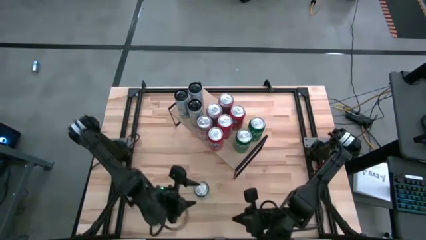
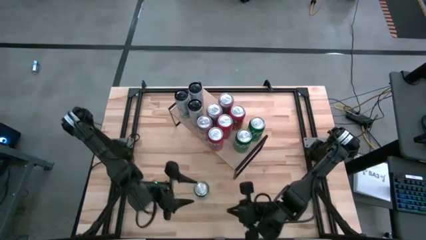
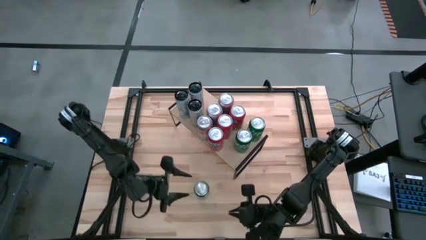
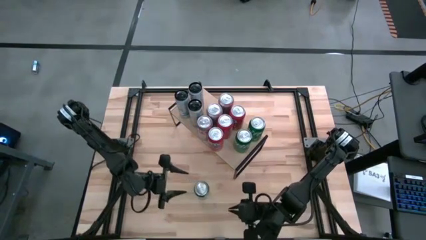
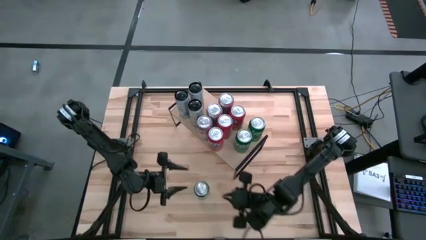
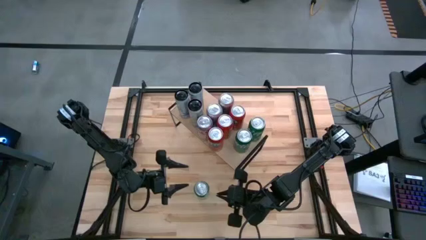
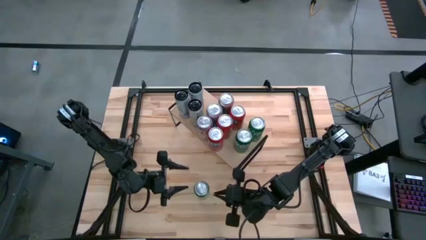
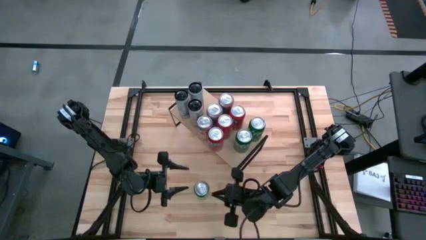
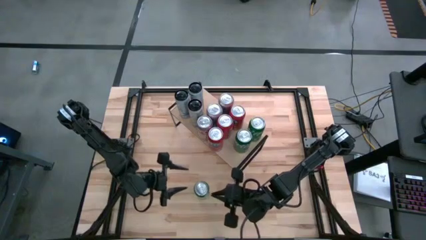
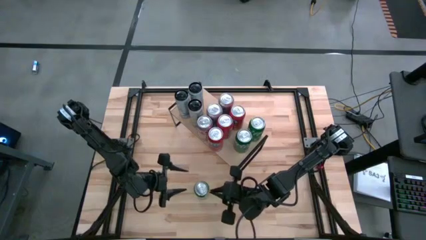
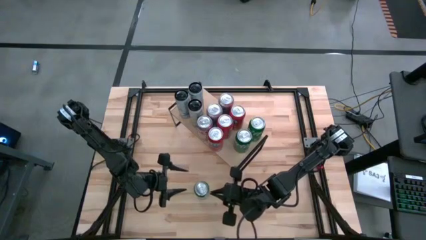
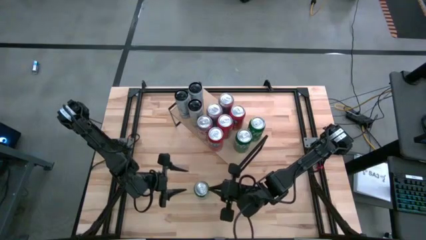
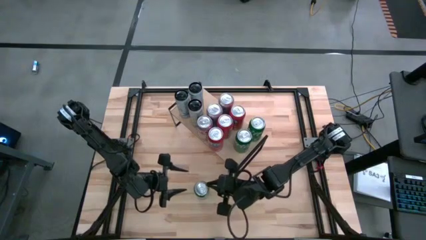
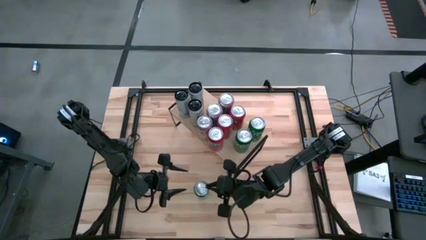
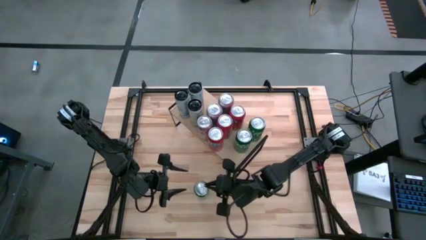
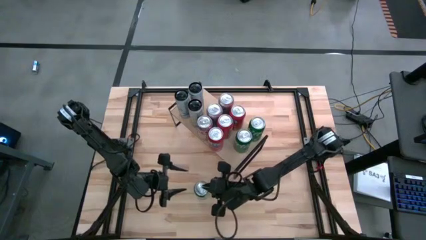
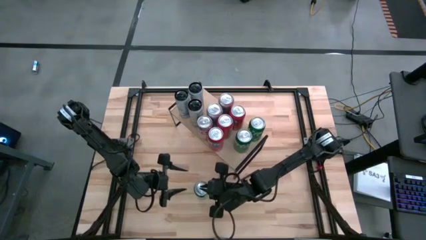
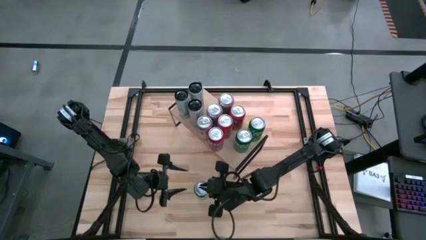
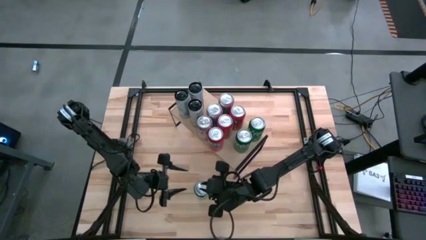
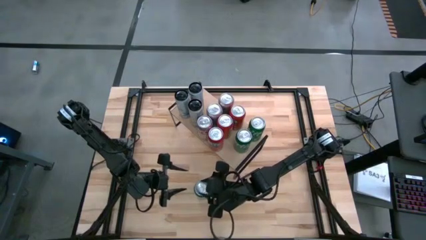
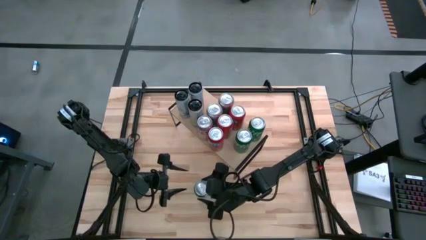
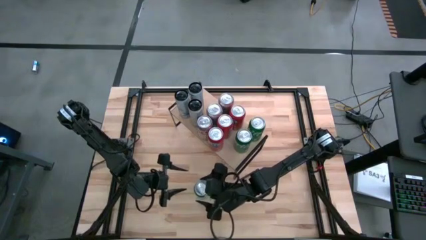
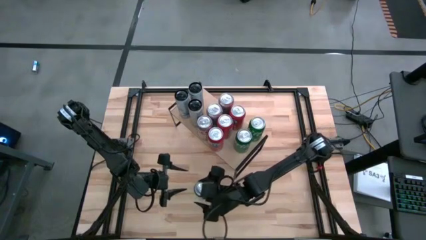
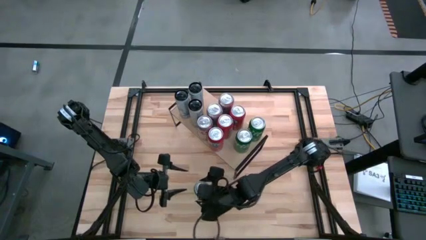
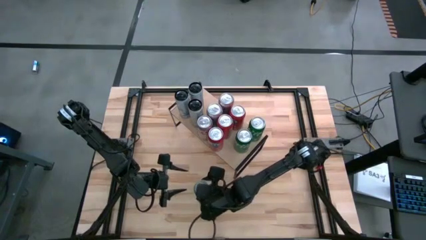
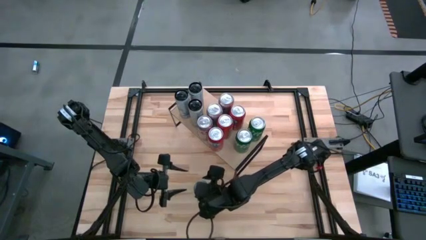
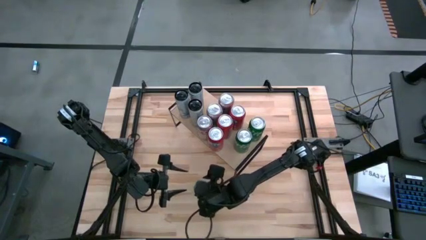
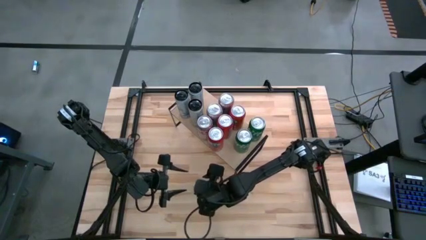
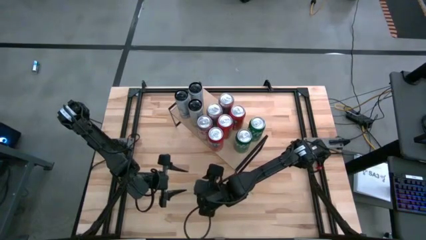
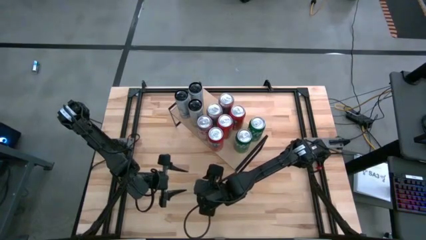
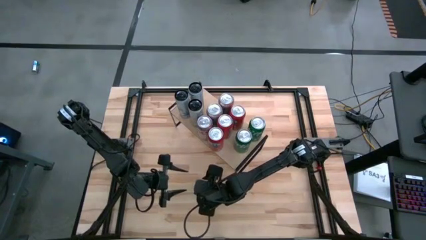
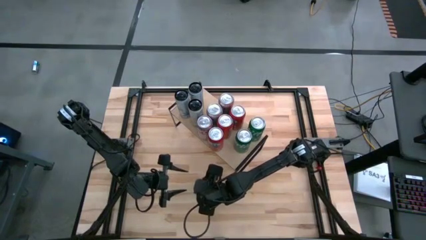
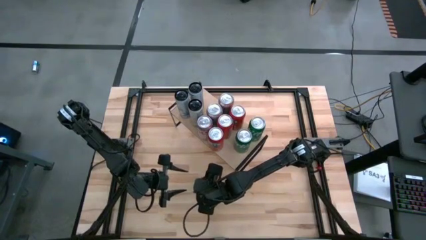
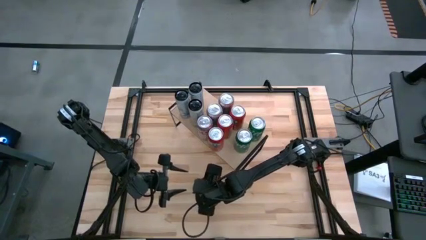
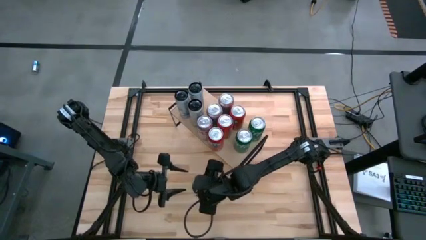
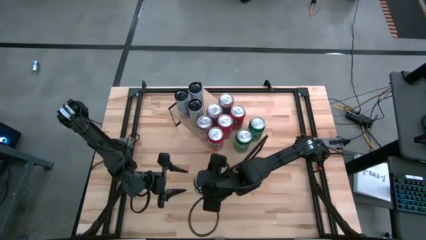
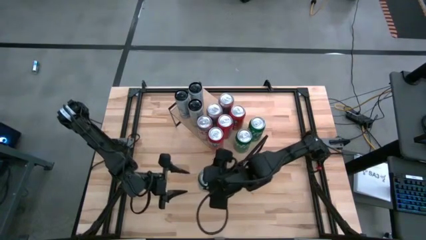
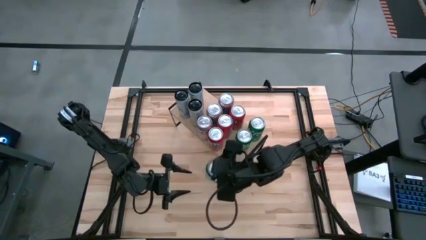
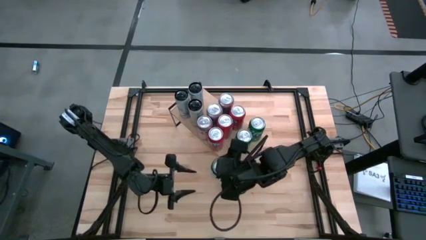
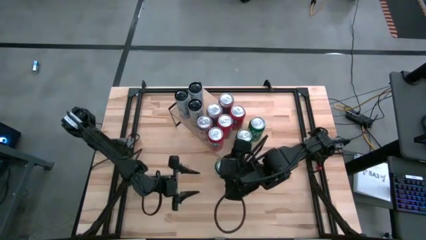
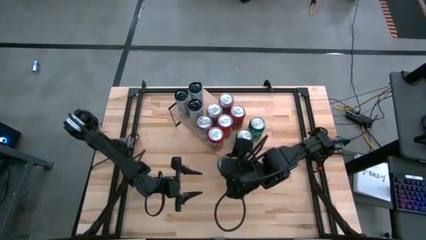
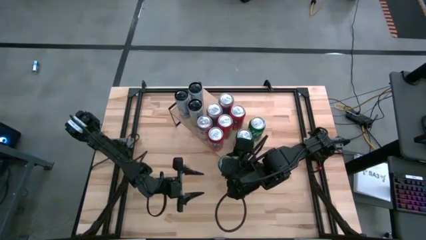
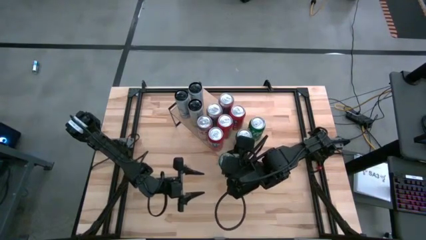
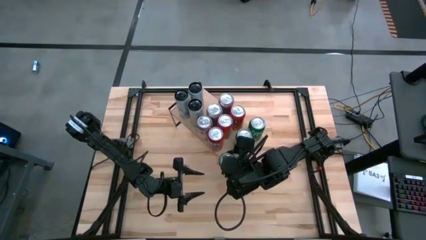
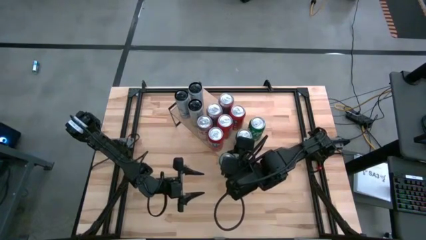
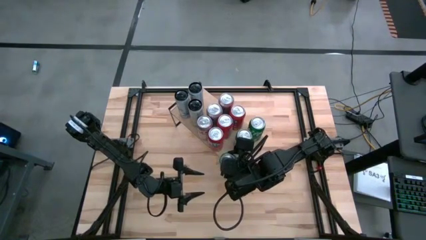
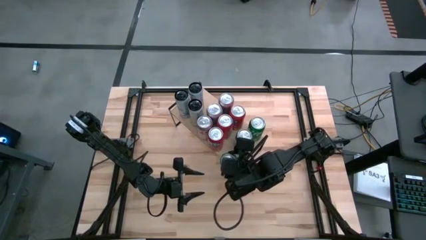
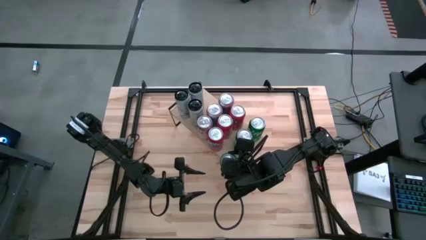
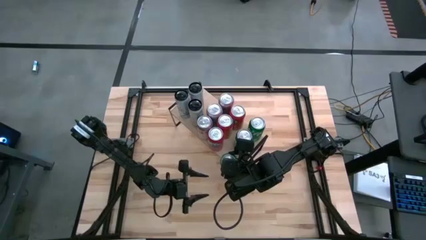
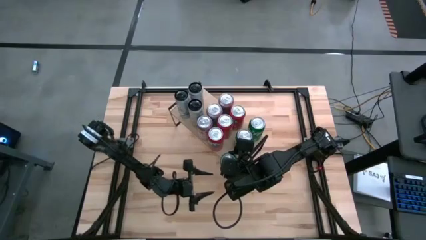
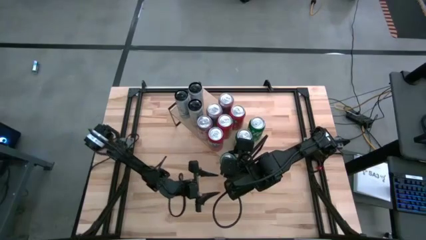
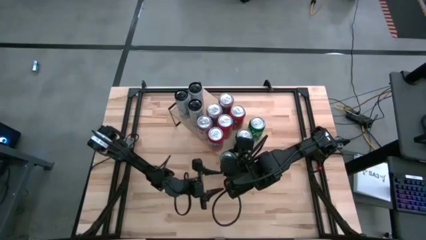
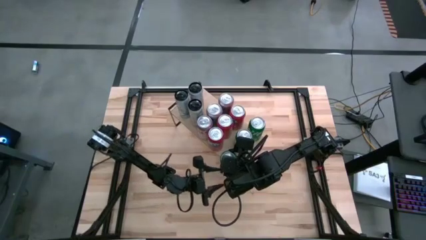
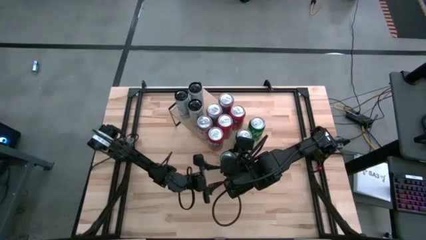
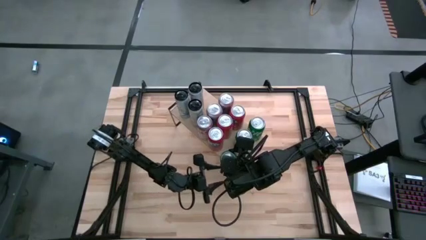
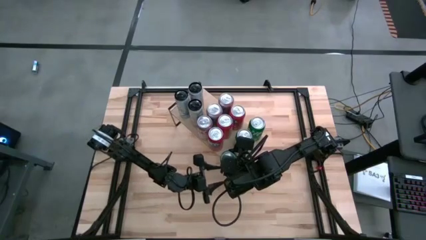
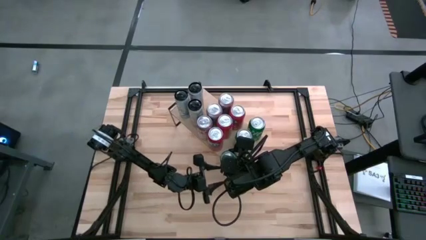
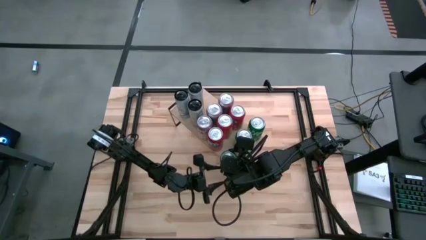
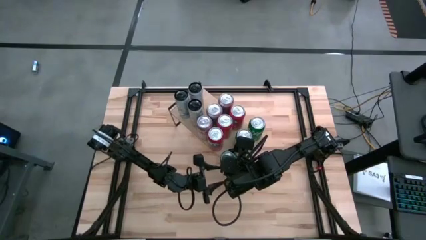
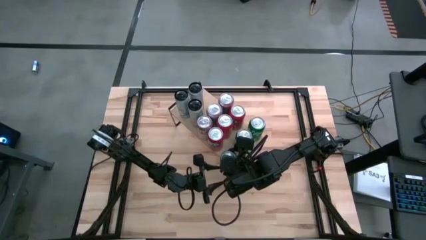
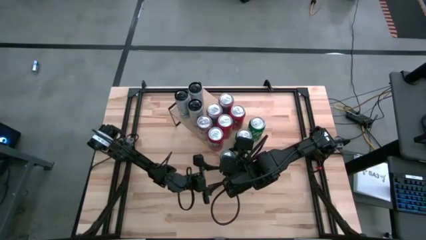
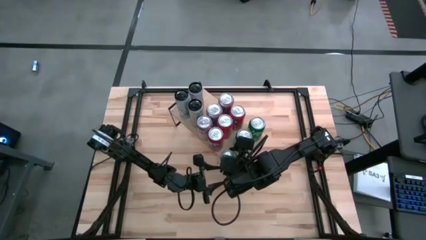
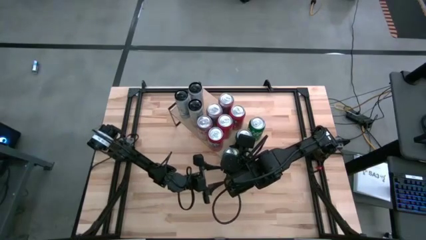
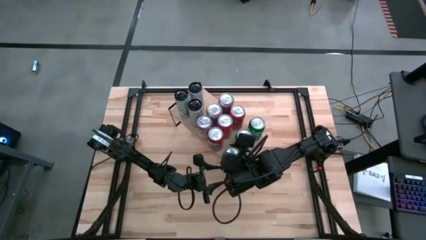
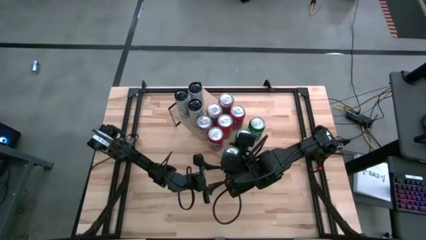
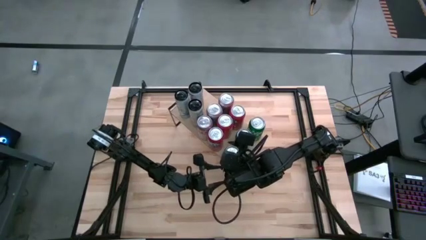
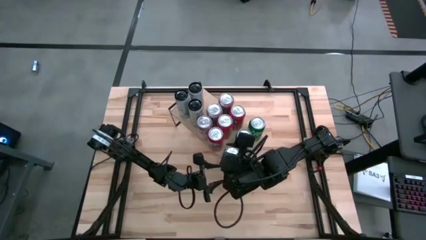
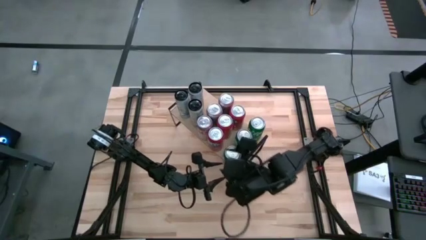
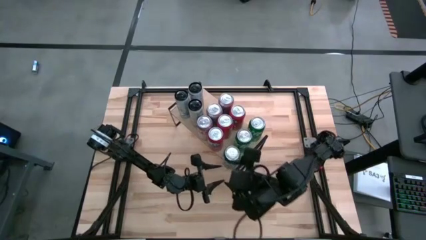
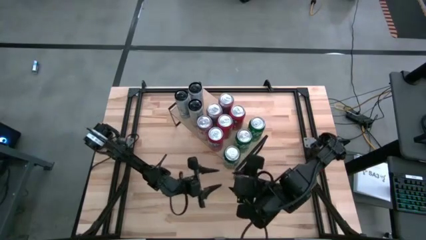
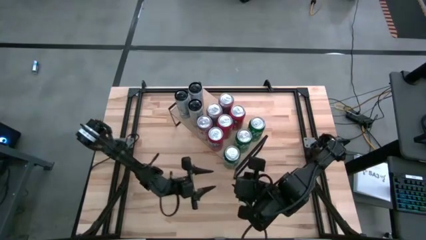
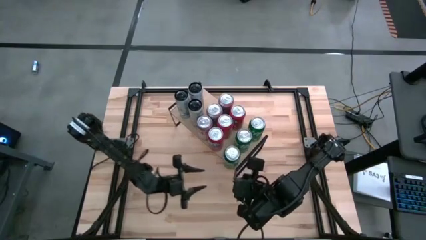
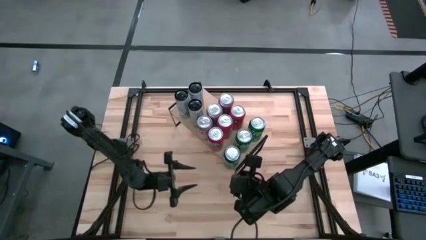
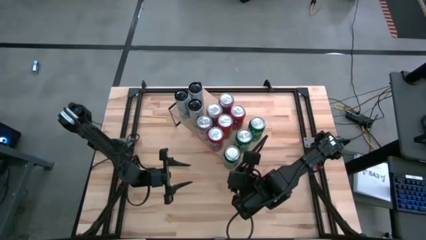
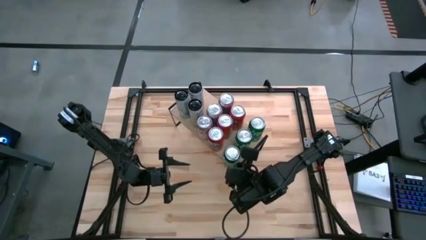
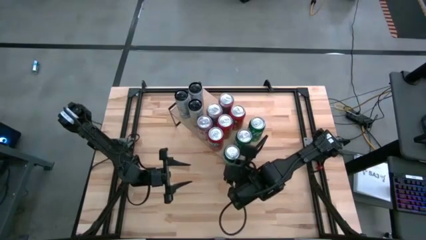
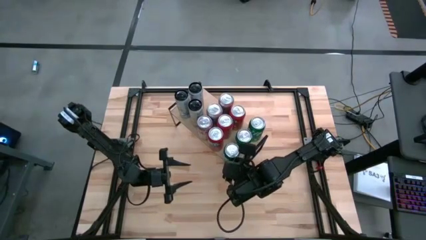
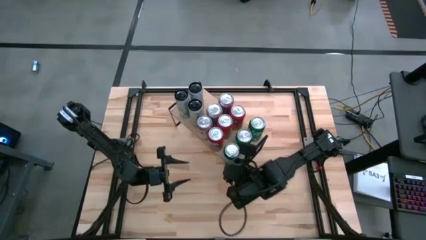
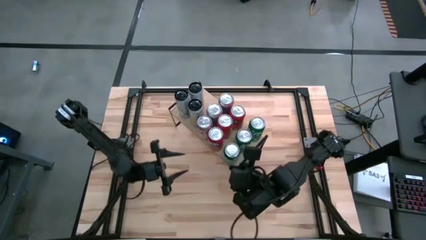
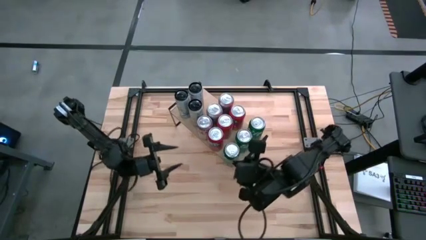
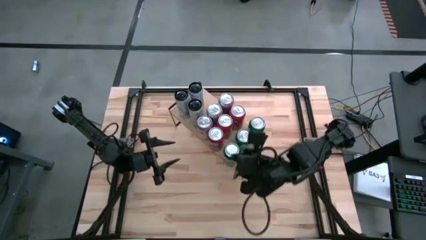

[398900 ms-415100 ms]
Task: Place canned beverage on shelf
Put the green soda can on the shelf aligned with the other green soda can

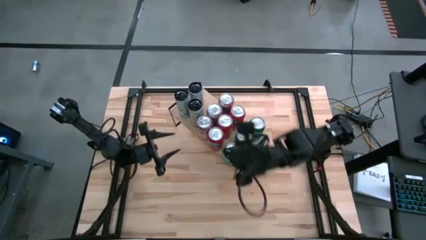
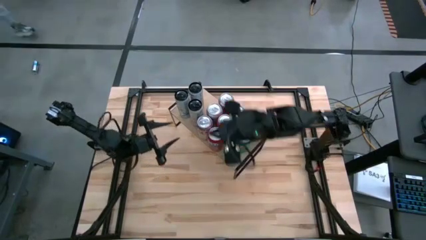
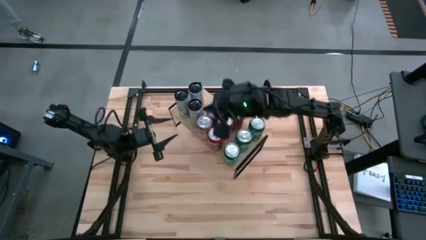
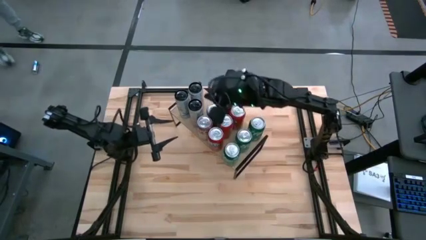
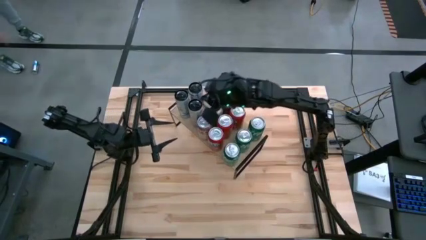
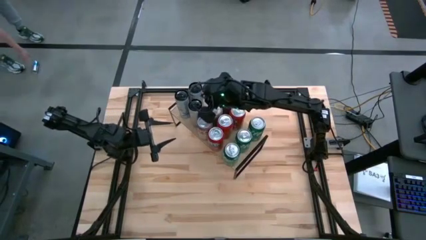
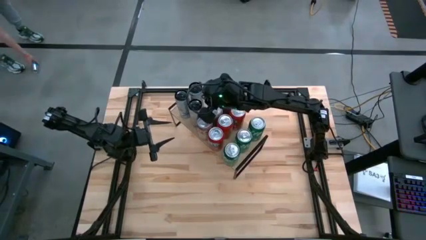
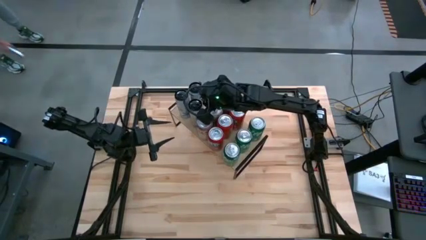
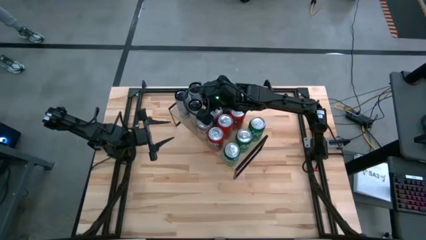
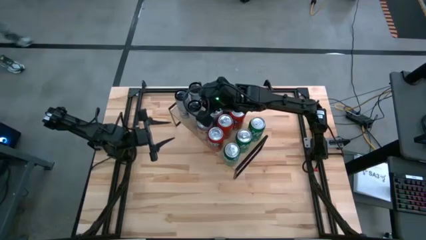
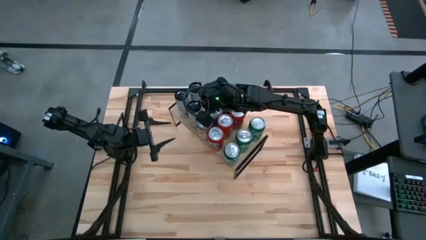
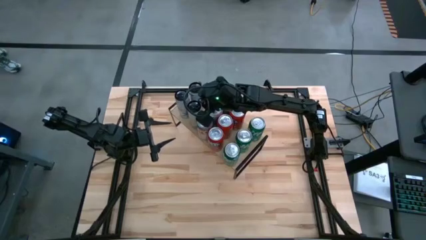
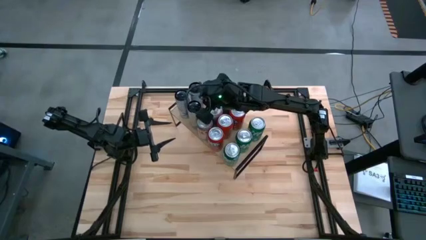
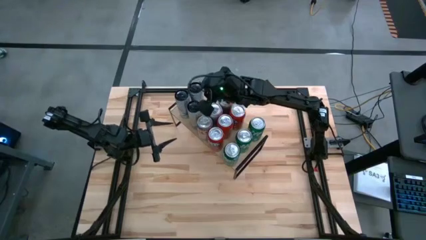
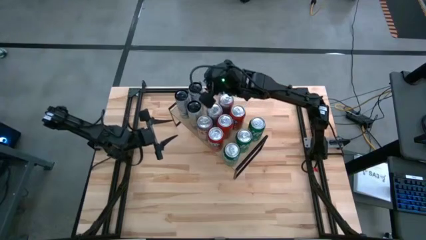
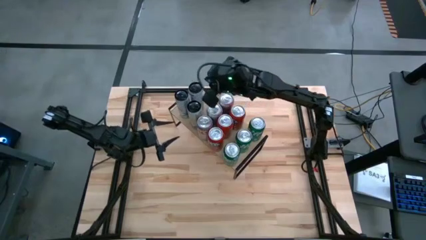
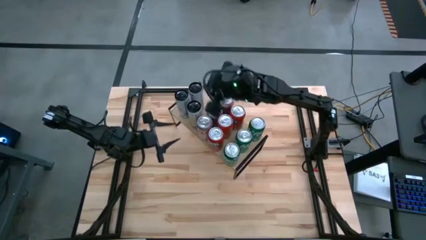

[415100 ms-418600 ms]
Adjust the yellow soda
